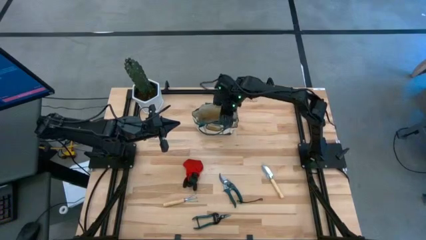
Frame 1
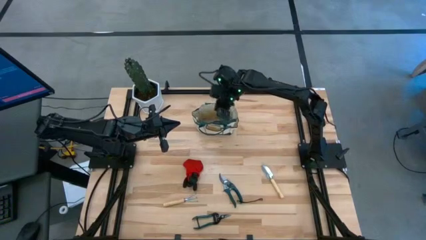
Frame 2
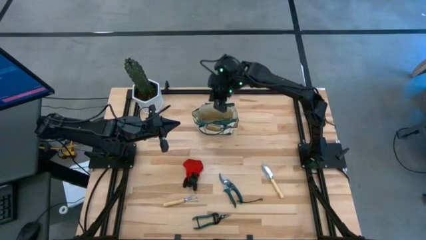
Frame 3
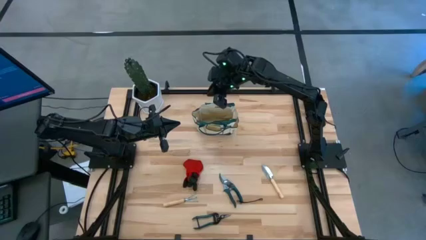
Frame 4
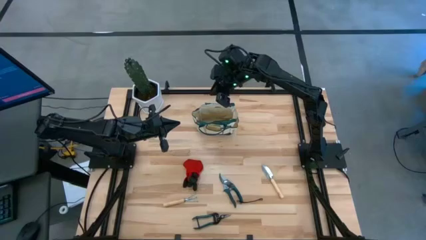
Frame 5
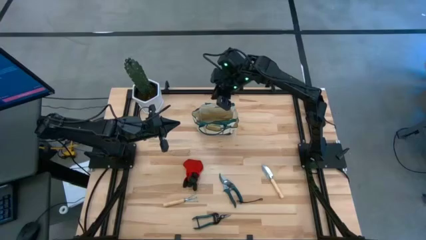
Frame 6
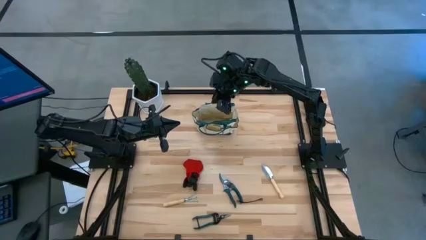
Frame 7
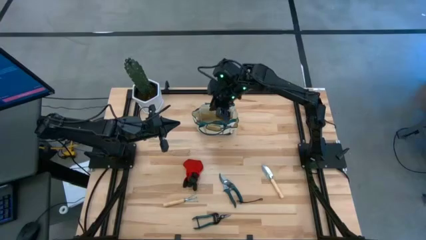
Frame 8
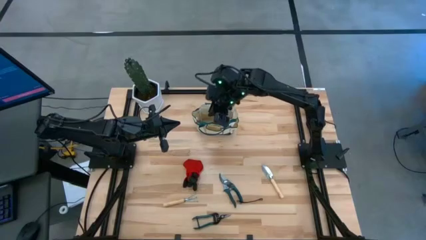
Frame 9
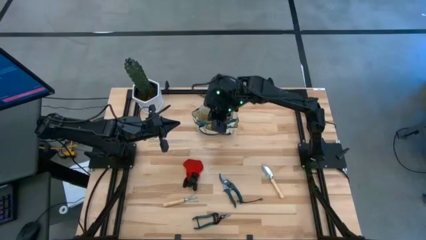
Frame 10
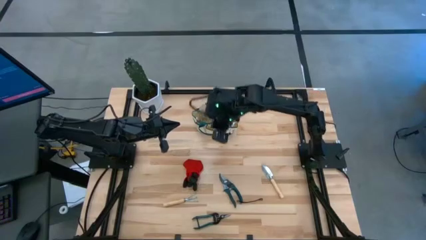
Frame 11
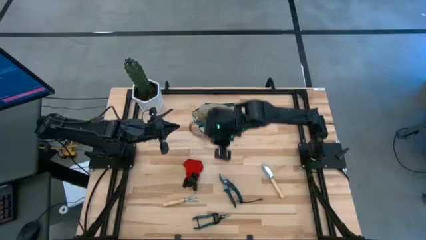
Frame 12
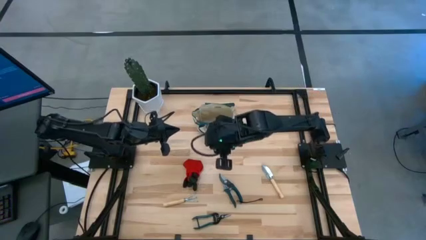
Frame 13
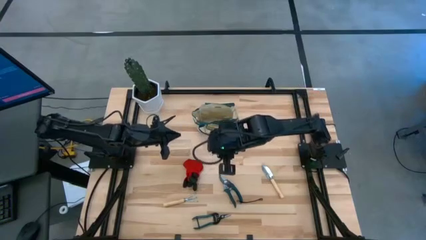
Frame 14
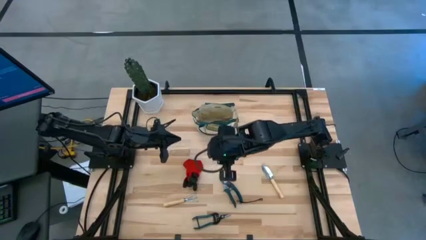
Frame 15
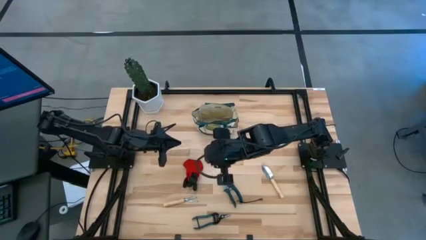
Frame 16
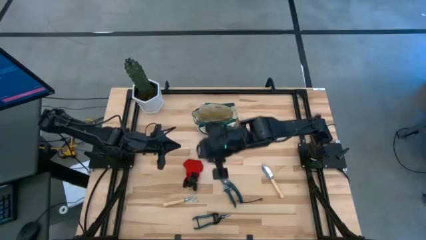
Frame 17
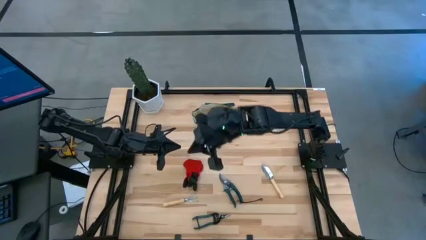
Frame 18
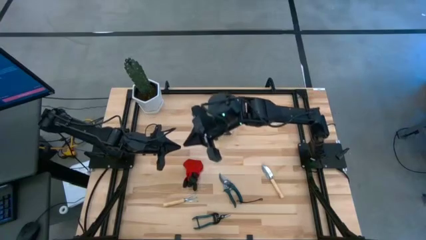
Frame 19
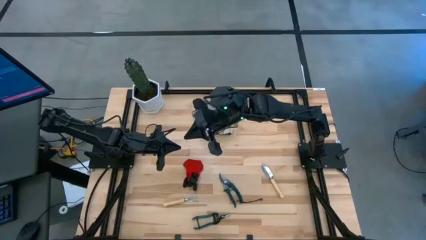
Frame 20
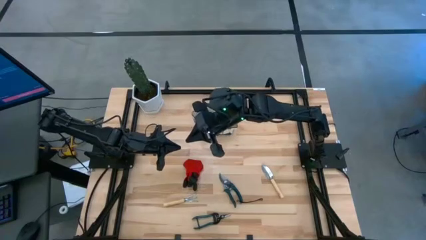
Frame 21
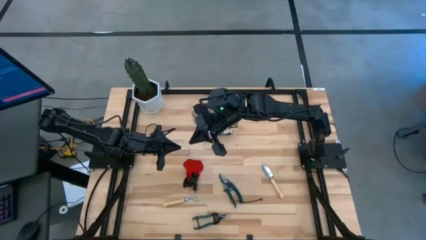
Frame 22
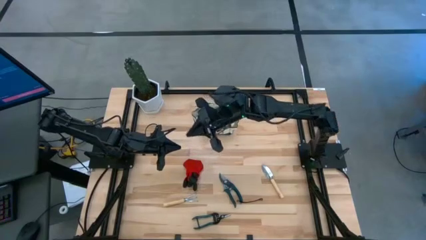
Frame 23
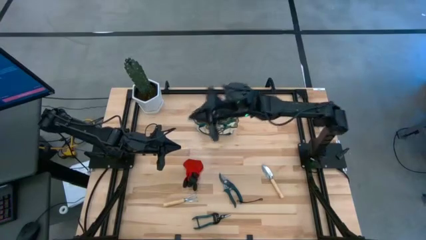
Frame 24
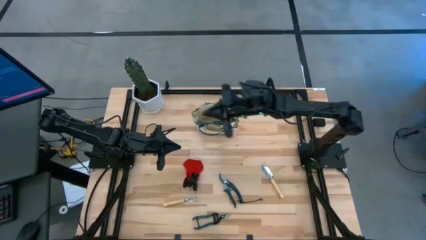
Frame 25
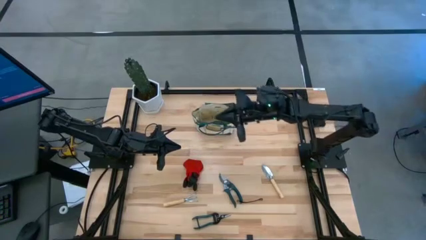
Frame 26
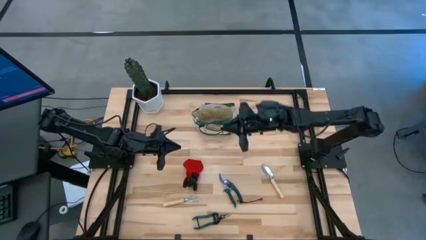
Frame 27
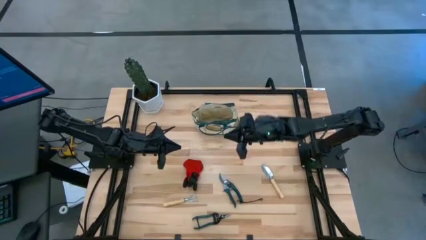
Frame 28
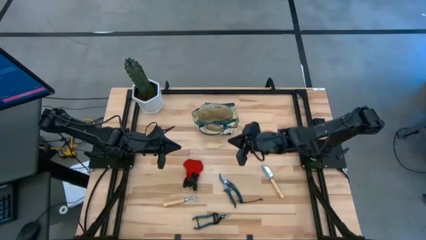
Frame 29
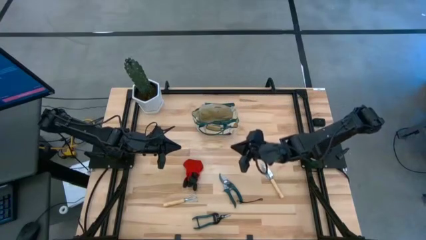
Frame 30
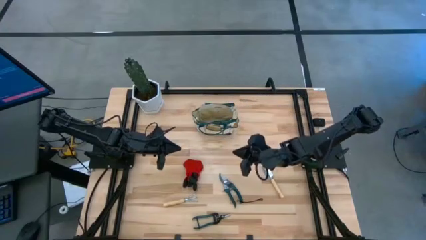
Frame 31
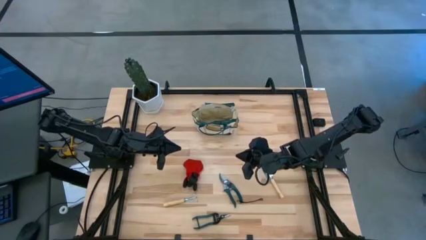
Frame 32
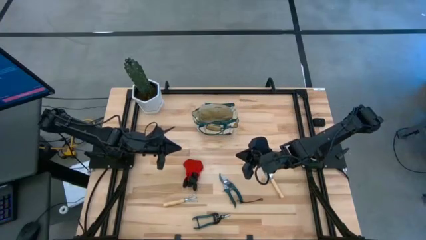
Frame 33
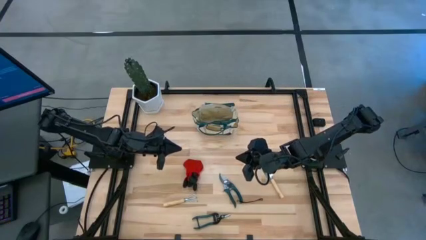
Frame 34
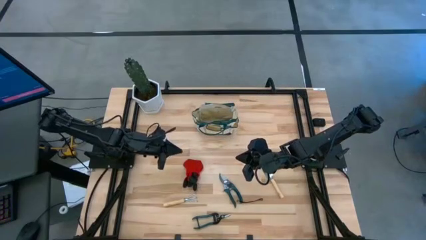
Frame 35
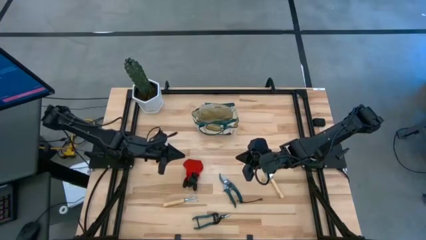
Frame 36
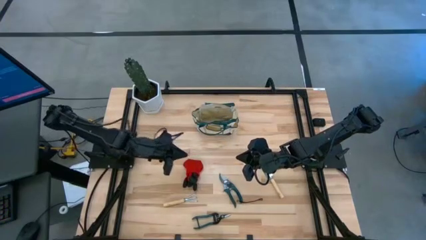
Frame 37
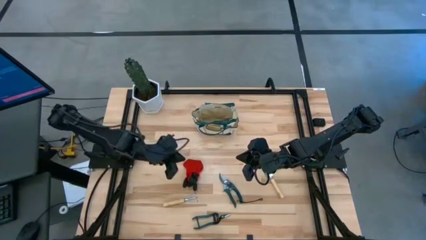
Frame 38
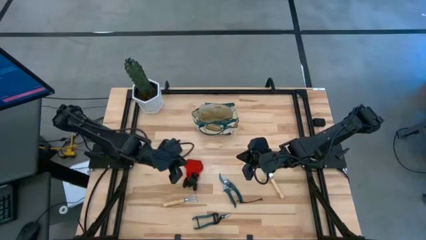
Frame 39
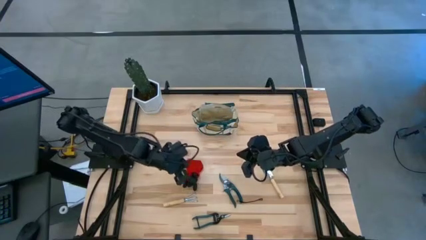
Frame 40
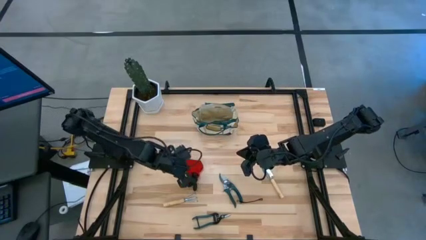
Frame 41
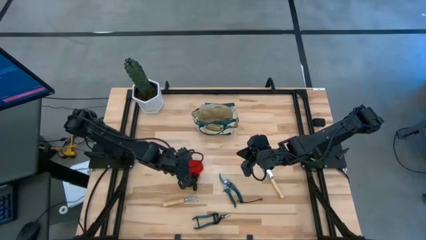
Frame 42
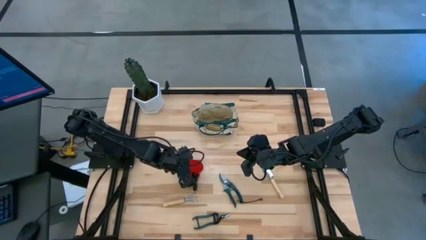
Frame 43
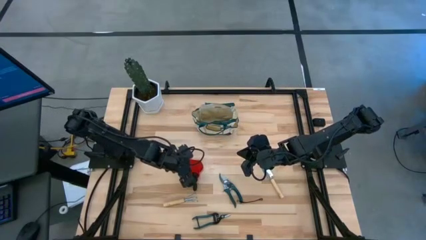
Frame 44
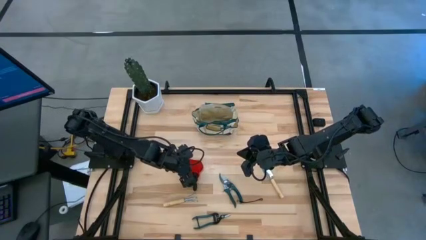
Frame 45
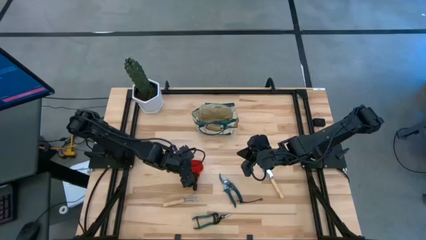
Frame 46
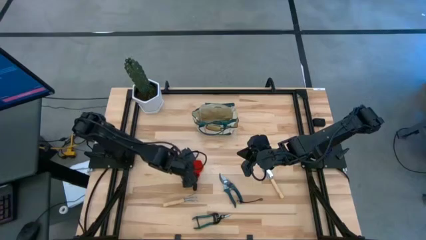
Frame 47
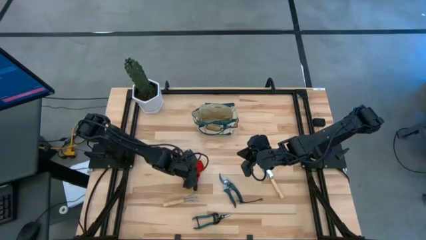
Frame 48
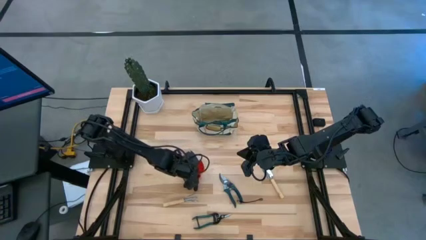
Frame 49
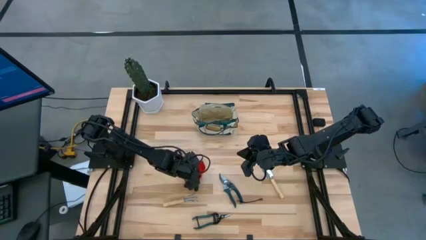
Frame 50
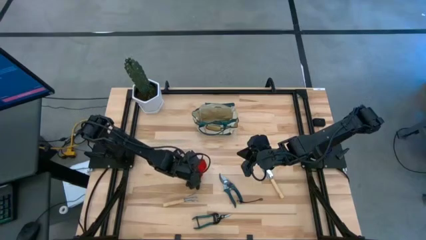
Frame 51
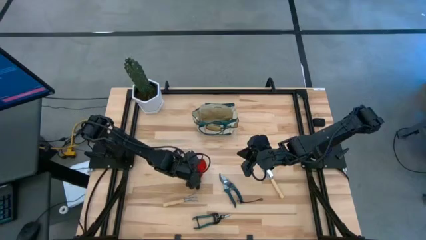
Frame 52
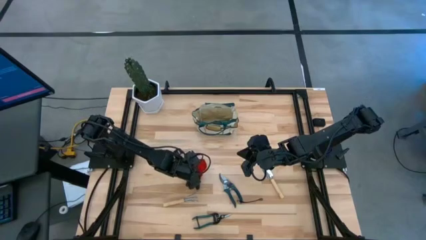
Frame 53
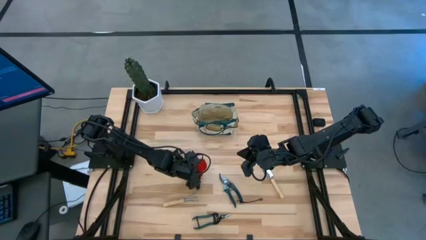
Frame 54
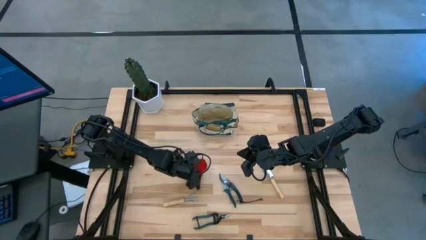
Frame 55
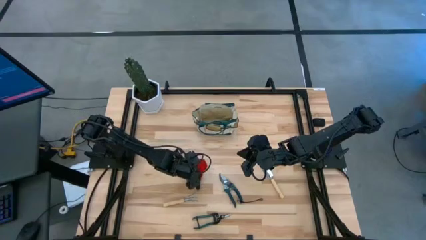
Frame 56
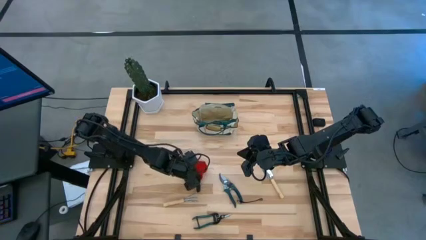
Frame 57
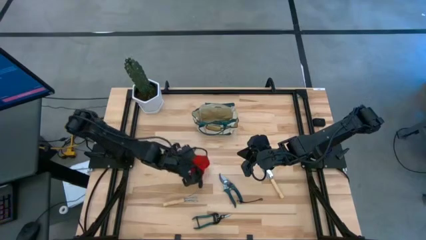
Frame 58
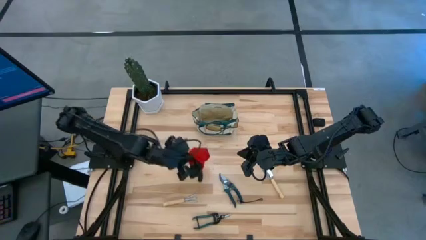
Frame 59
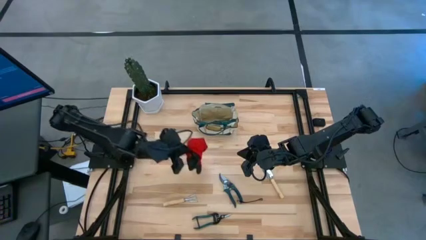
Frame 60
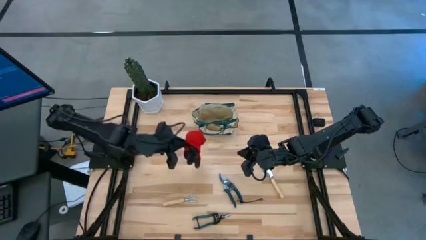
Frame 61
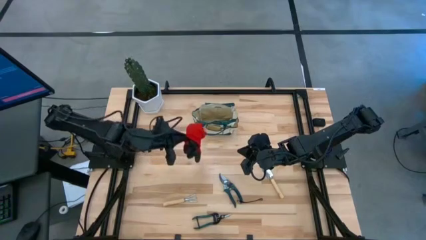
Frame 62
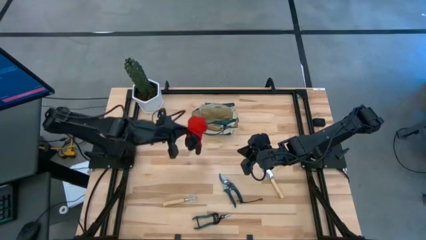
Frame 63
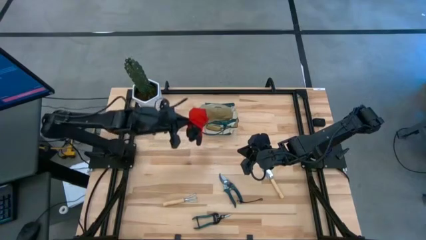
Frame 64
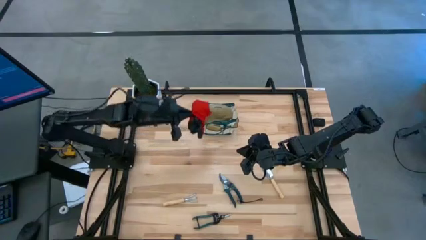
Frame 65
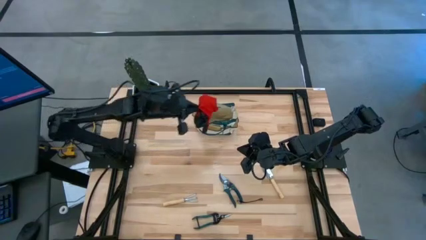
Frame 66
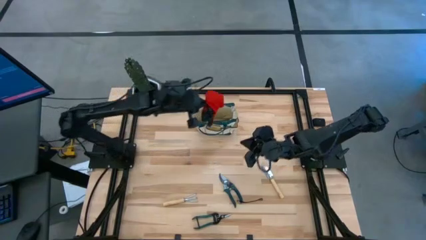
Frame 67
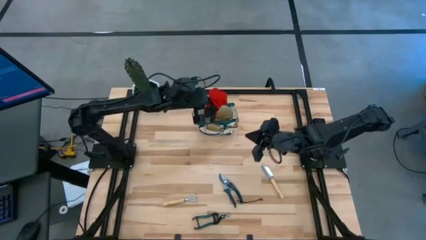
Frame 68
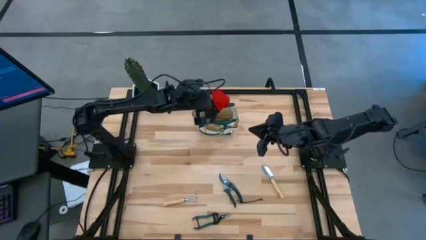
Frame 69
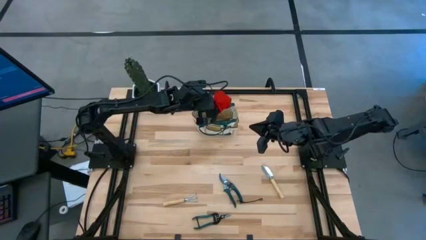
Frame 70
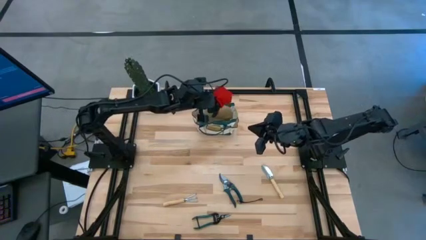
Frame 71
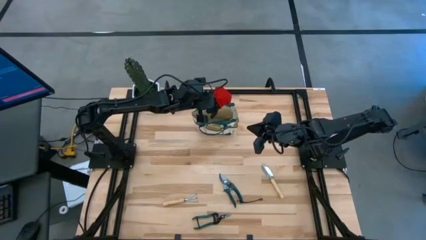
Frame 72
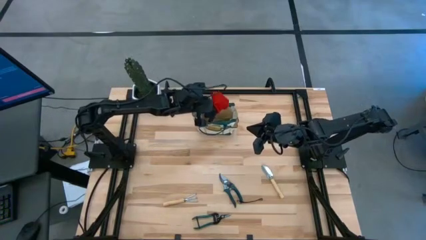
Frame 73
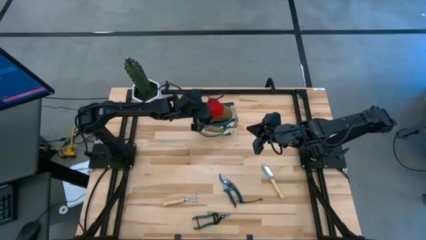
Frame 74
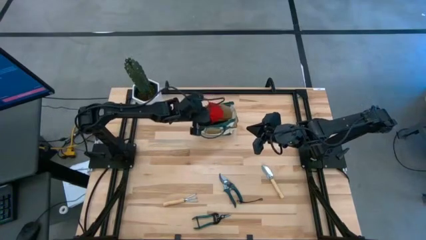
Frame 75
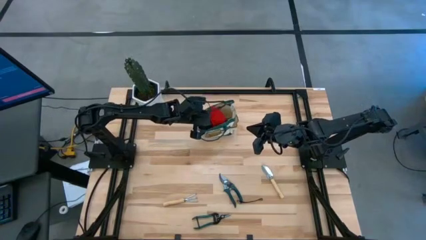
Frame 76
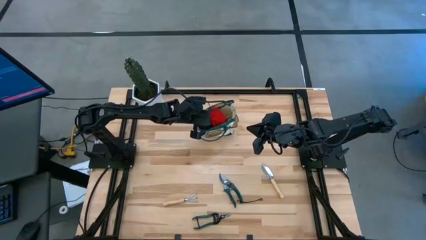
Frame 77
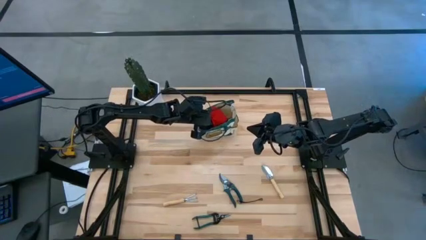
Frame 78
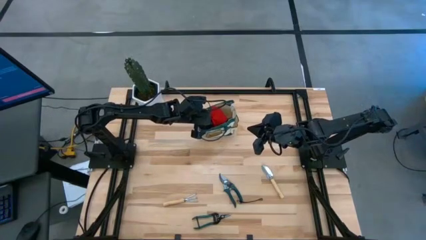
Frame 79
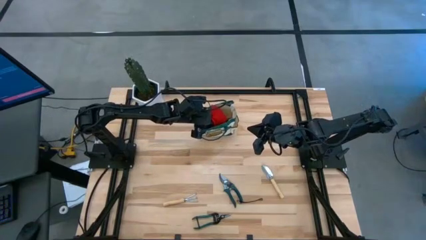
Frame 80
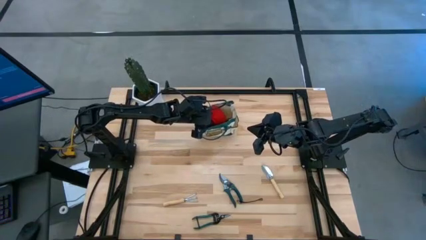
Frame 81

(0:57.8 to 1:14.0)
Task: Pick & Place Garden tools in Gardening bag
Put the gloves into the gardening bag
